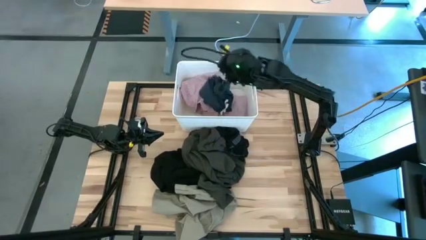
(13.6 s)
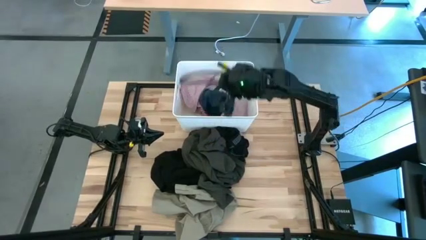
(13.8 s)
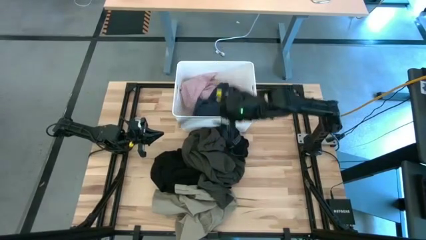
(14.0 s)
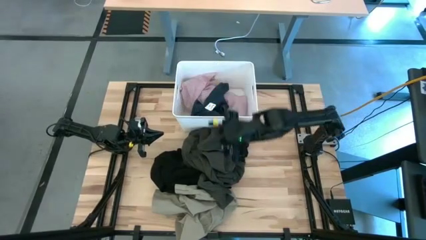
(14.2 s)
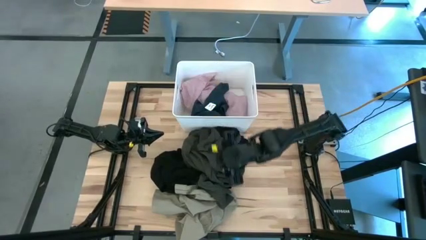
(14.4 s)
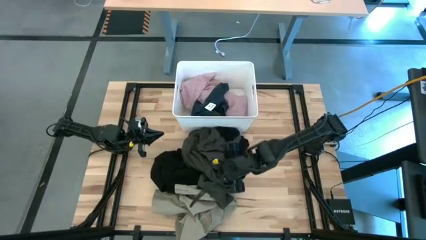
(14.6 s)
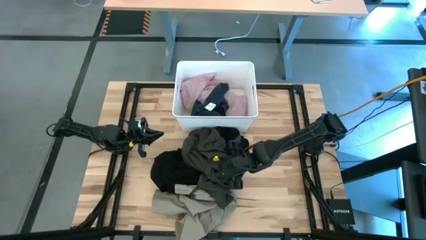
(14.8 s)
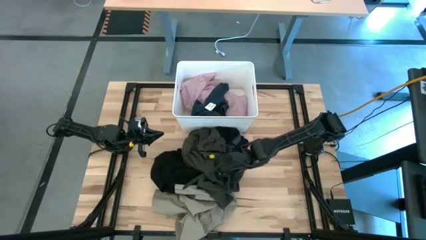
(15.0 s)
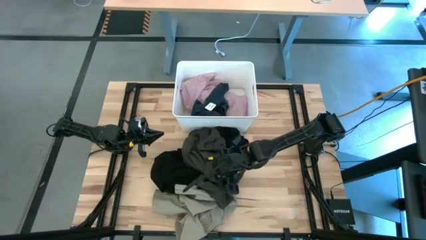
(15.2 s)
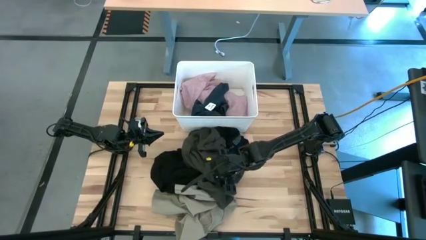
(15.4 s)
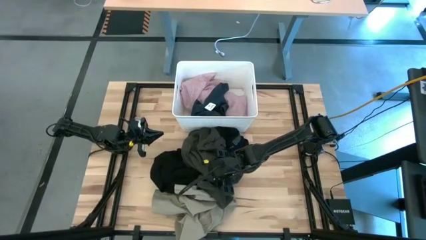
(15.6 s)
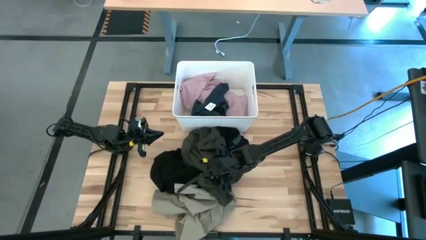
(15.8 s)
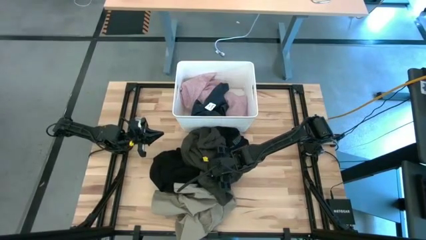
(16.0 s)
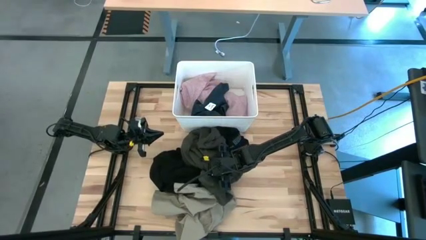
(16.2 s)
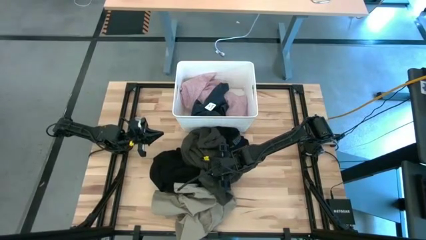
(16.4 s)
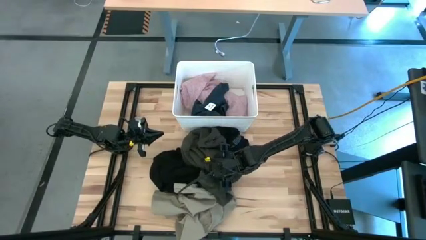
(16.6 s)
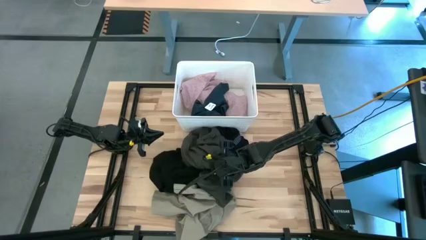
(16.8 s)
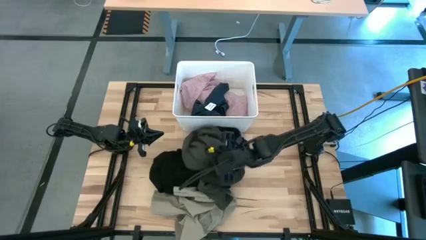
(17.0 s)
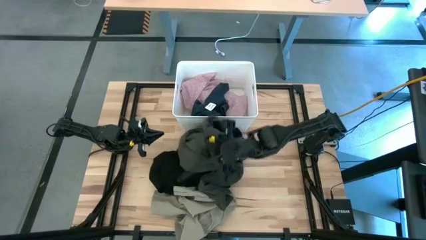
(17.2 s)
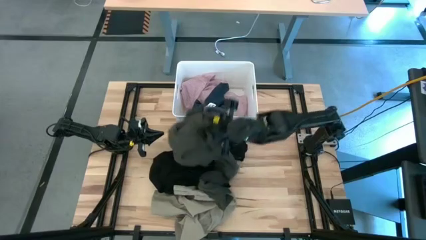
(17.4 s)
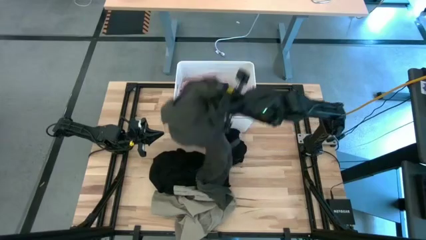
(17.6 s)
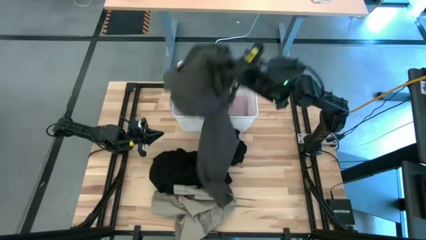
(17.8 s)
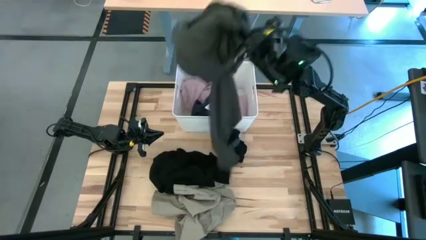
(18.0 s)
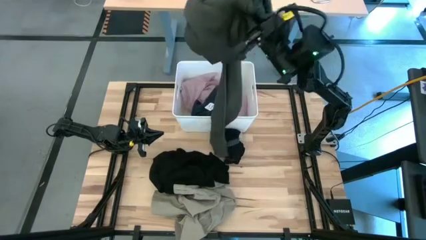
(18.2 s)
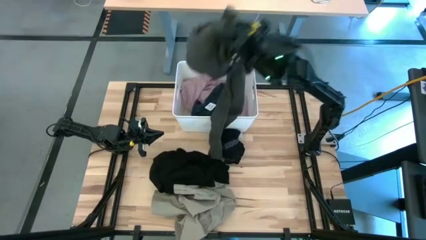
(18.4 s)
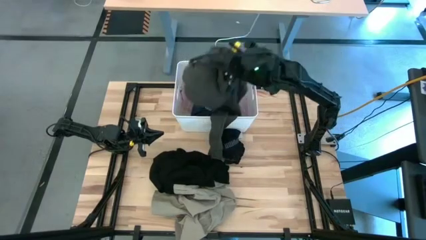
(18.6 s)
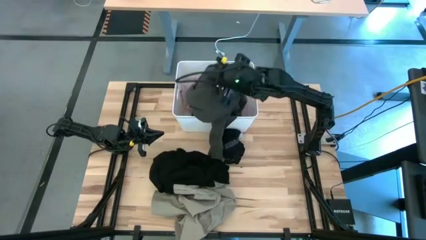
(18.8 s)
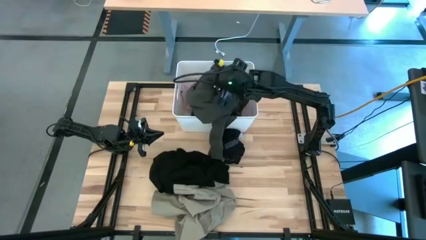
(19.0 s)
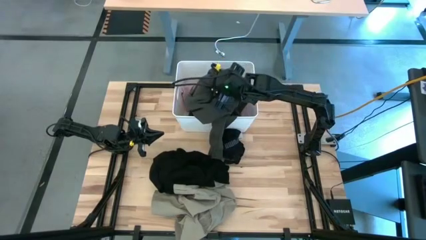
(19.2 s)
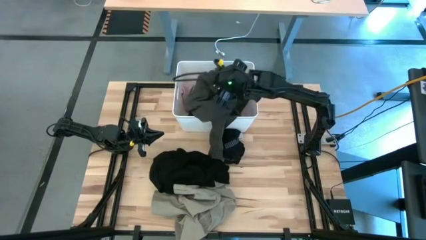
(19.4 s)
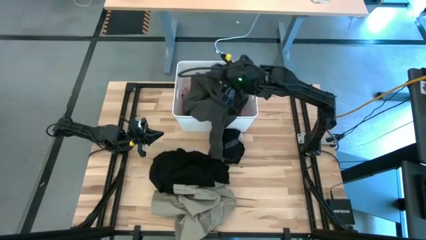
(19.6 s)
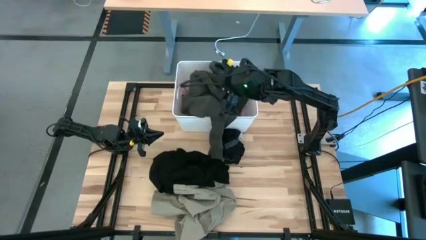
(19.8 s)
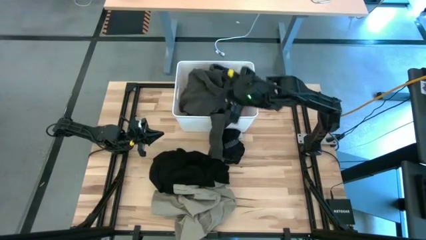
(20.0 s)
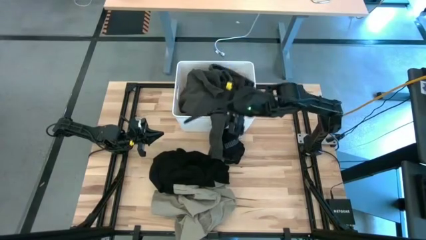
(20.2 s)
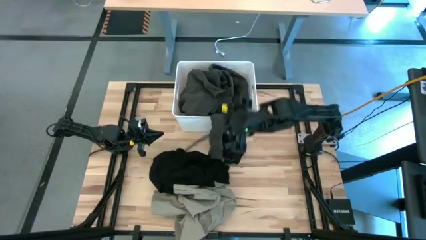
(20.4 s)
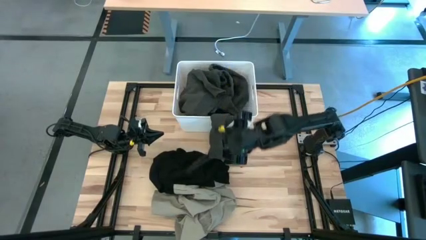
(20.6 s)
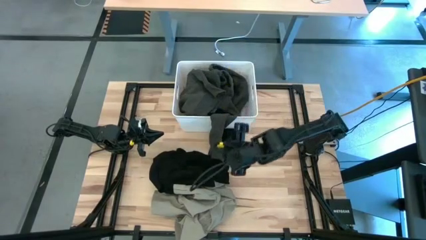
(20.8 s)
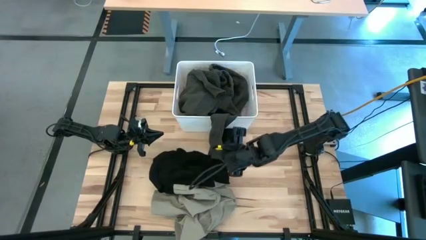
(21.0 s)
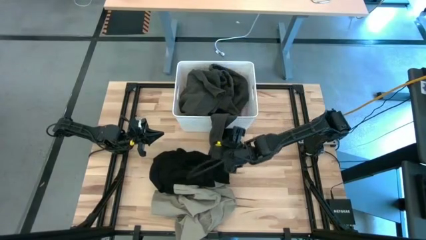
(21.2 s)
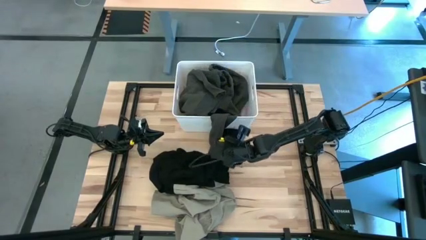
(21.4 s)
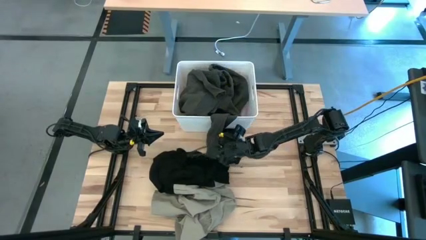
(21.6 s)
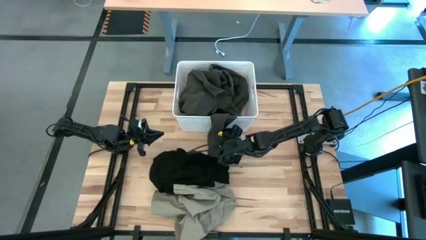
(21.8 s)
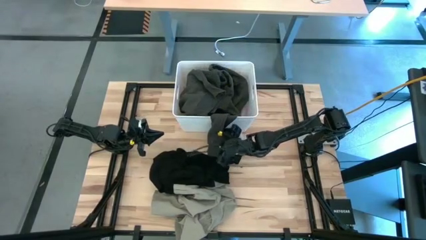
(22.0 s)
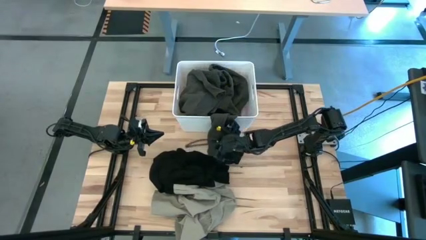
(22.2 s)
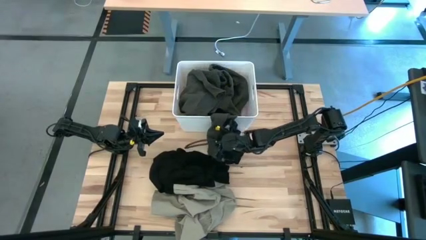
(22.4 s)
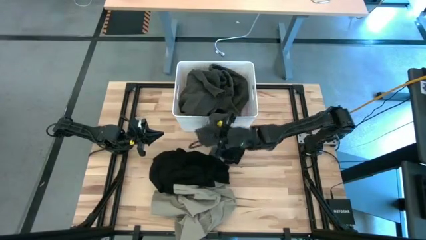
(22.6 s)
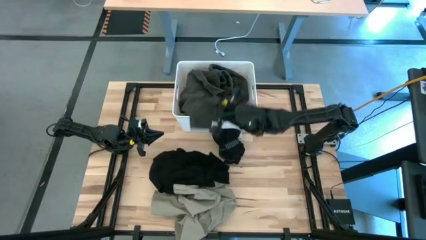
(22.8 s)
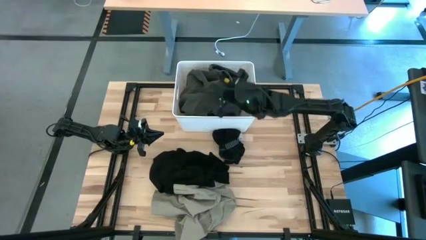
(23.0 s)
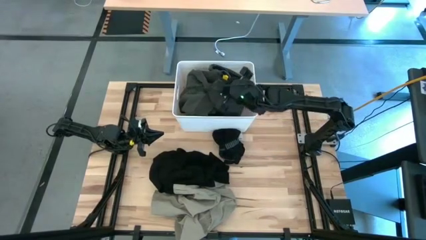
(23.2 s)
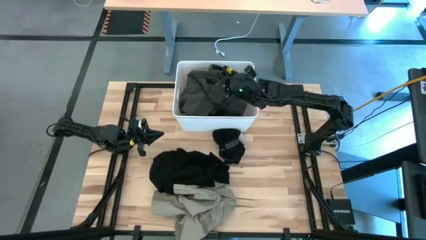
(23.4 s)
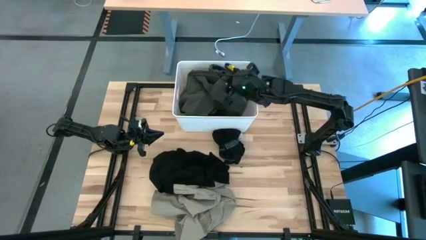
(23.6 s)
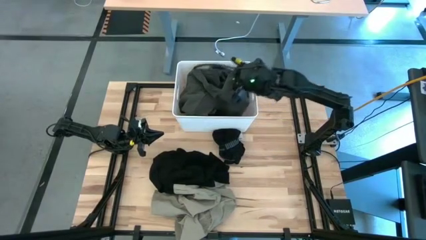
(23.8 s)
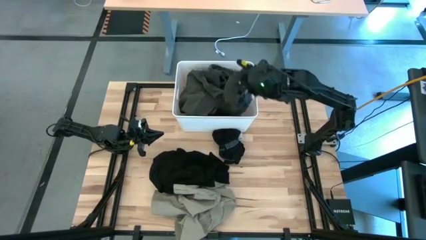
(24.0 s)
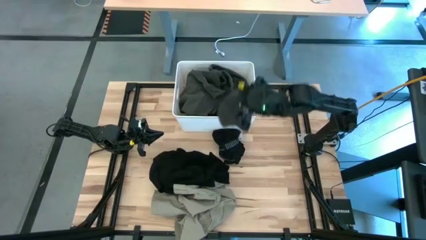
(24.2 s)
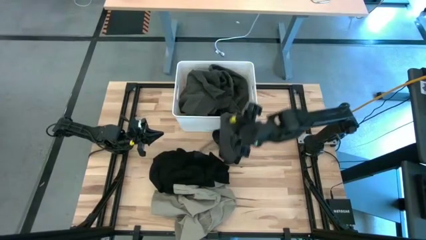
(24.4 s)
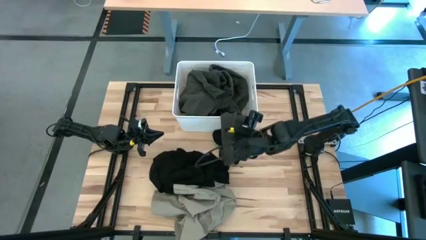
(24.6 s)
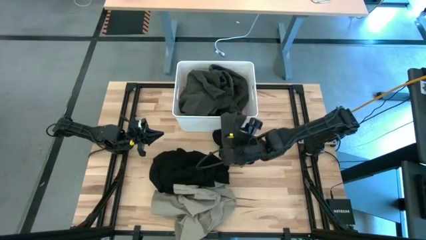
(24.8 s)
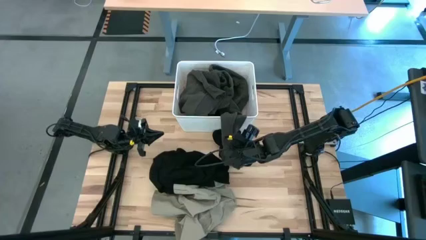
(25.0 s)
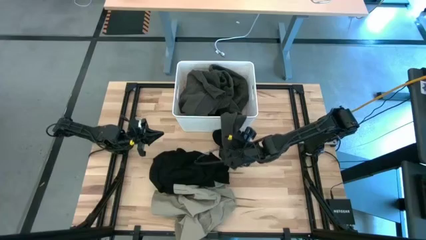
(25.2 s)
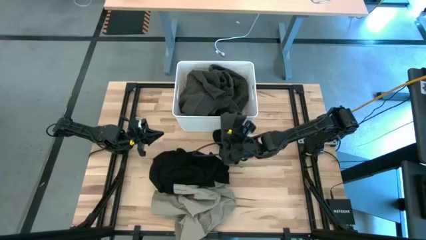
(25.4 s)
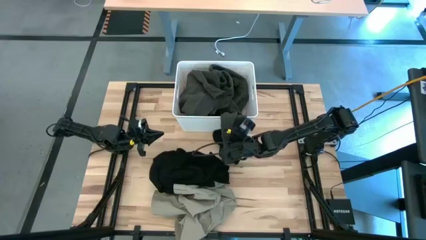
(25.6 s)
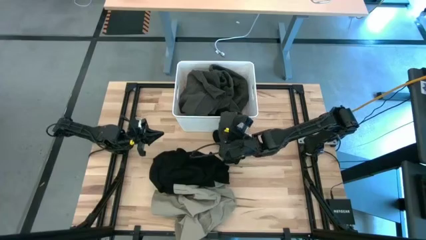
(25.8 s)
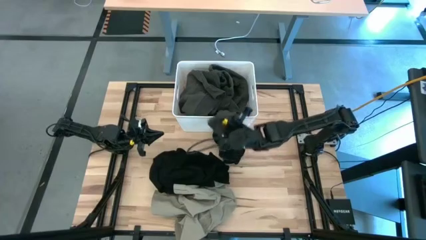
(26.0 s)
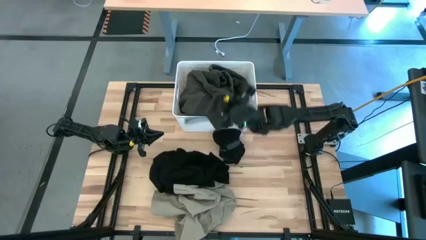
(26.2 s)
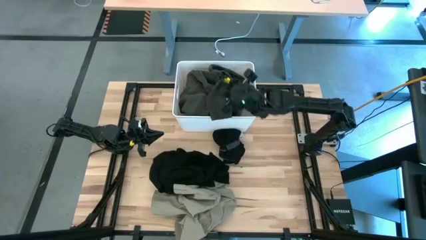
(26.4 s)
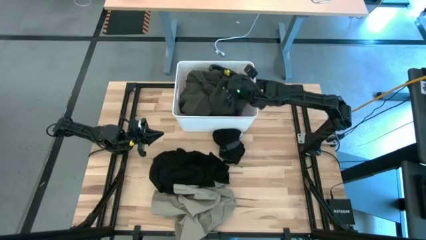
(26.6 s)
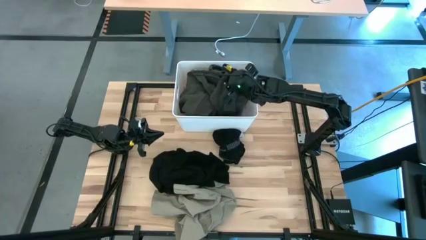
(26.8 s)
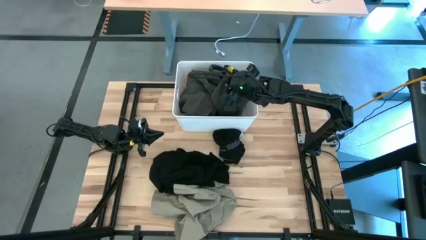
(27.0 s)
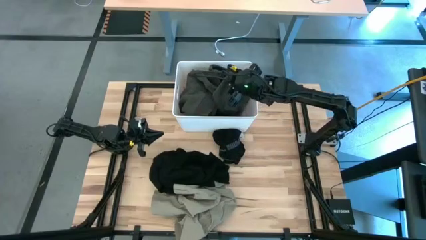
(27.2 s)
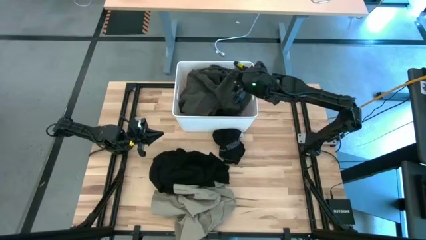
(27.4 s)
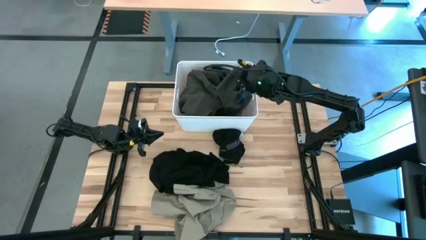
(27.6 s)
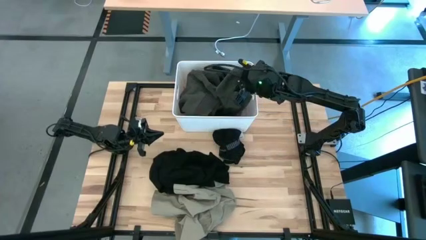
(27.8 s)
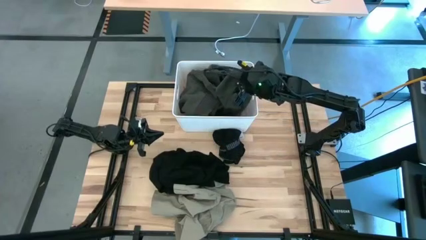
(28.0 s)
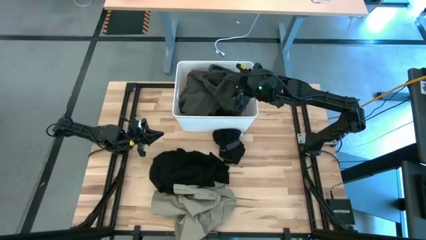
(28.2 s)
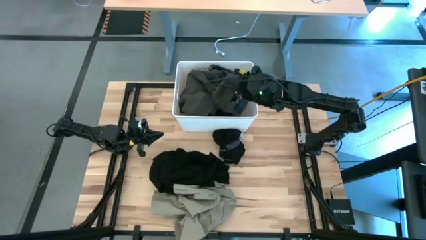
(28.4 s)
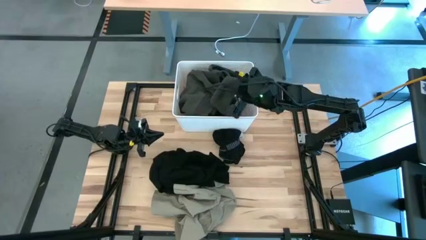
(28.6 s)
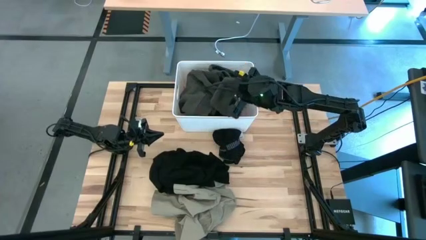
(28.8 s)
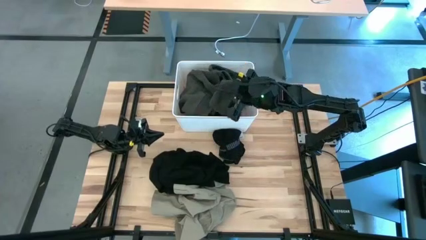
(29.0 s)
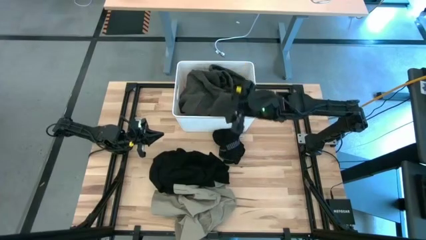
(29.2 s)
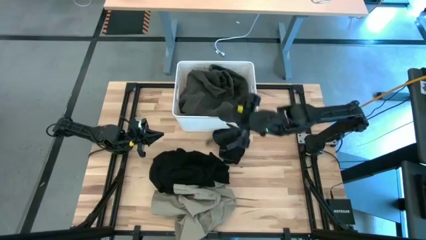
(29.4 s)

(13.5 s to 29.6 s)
Task: Sort clothes
Put the gray jacket into the white laundry bin
